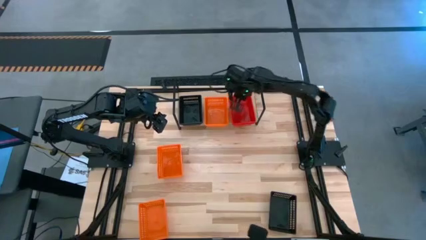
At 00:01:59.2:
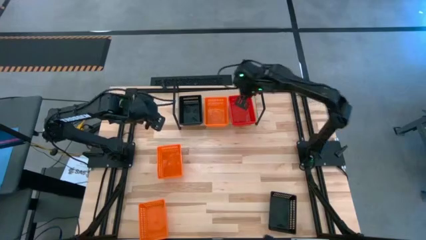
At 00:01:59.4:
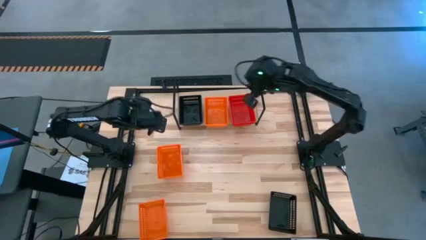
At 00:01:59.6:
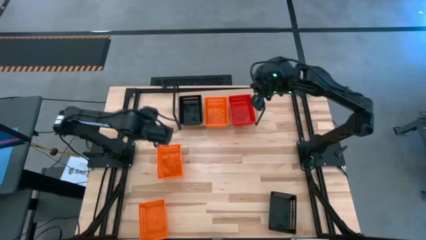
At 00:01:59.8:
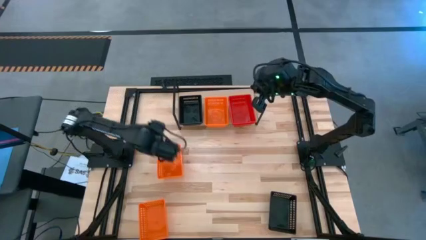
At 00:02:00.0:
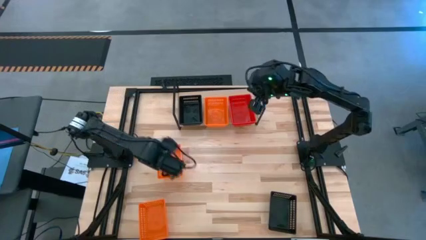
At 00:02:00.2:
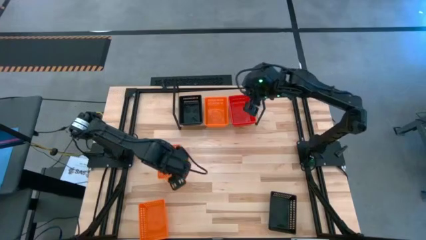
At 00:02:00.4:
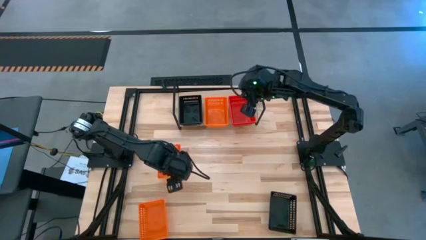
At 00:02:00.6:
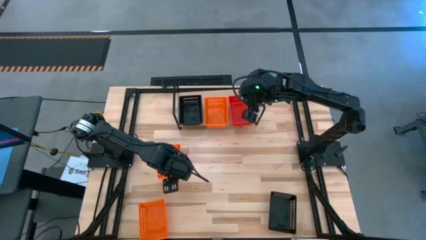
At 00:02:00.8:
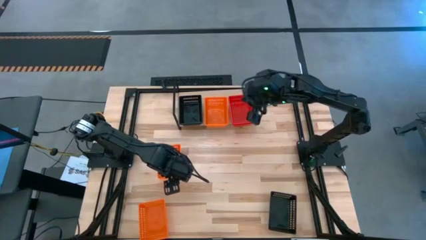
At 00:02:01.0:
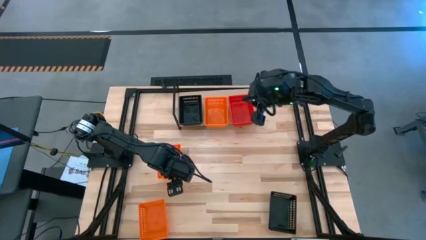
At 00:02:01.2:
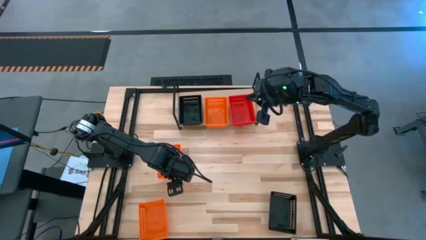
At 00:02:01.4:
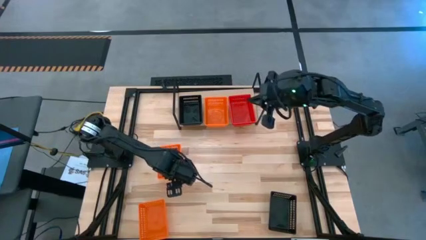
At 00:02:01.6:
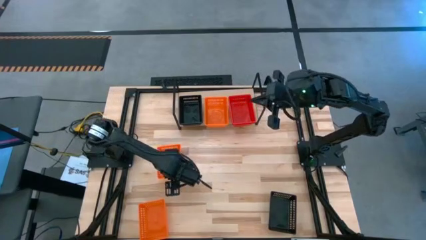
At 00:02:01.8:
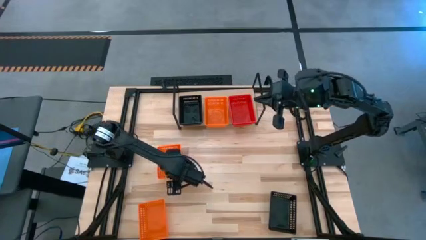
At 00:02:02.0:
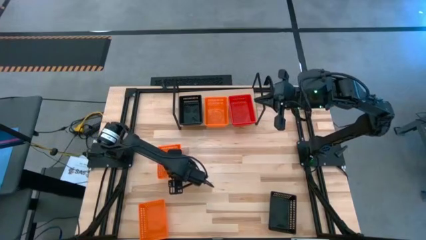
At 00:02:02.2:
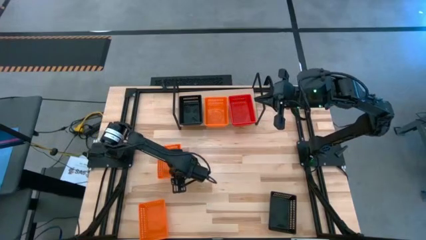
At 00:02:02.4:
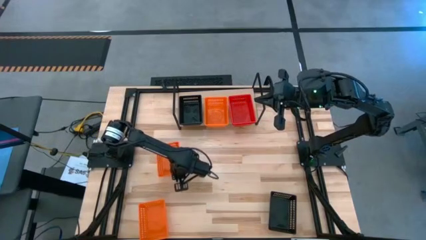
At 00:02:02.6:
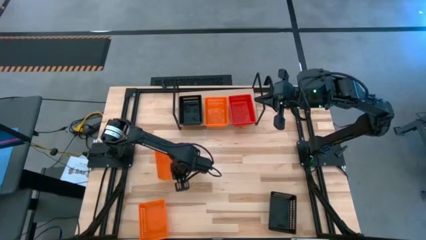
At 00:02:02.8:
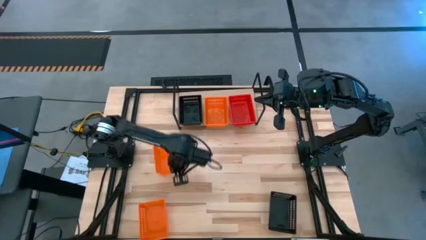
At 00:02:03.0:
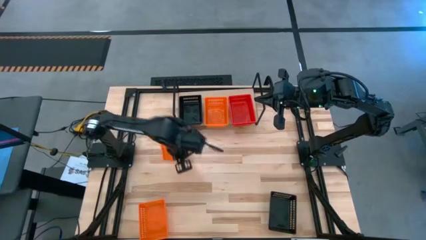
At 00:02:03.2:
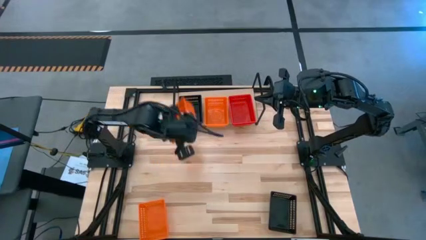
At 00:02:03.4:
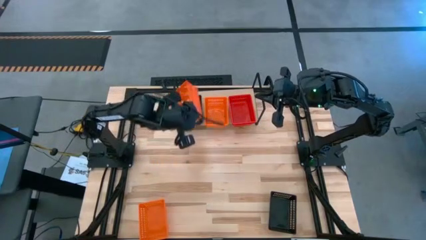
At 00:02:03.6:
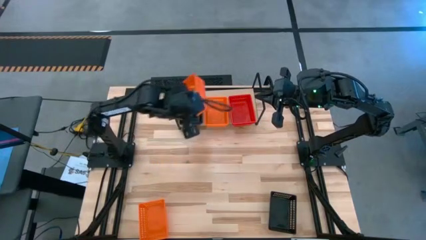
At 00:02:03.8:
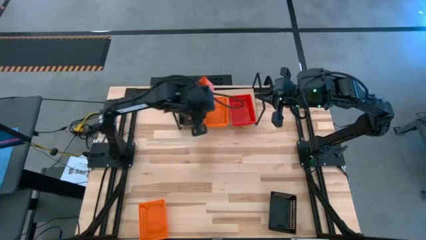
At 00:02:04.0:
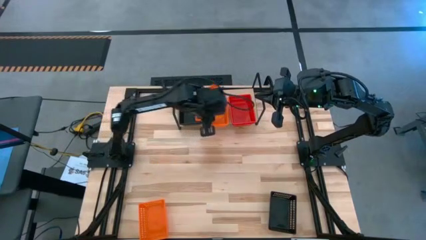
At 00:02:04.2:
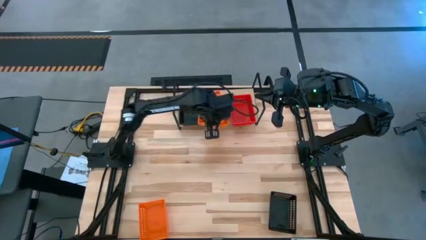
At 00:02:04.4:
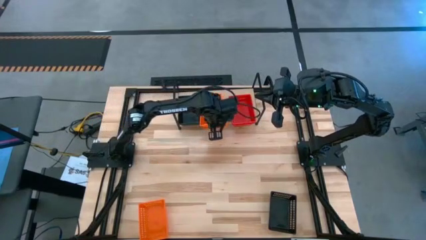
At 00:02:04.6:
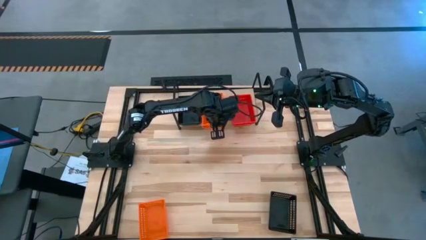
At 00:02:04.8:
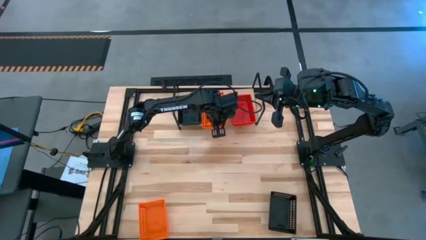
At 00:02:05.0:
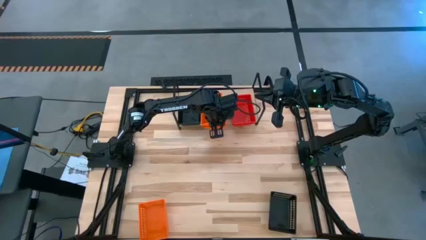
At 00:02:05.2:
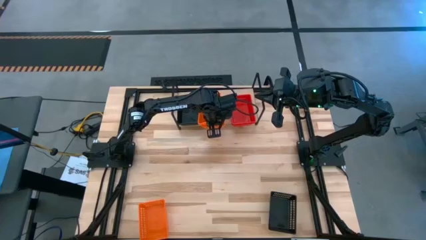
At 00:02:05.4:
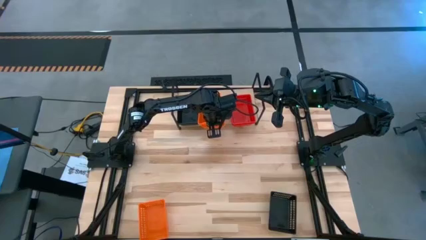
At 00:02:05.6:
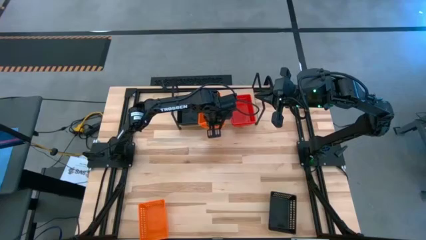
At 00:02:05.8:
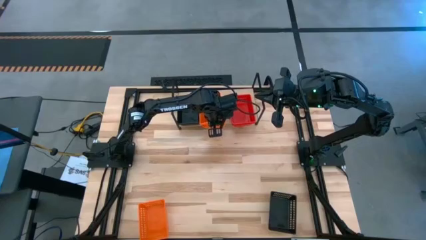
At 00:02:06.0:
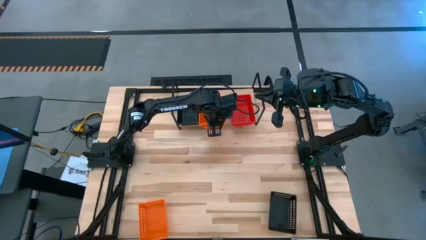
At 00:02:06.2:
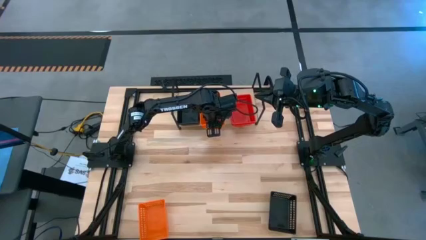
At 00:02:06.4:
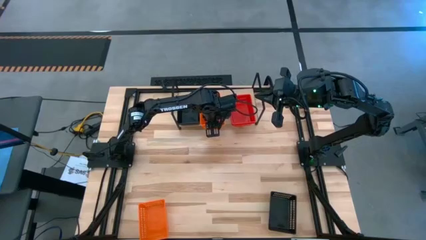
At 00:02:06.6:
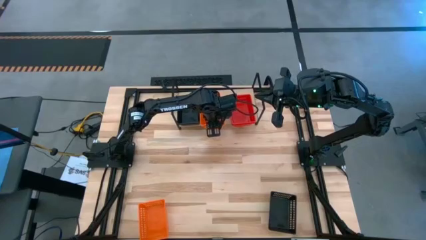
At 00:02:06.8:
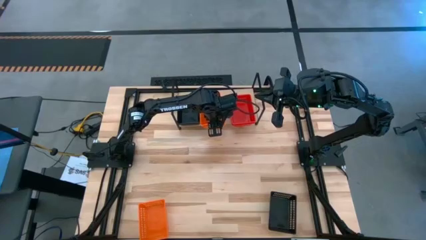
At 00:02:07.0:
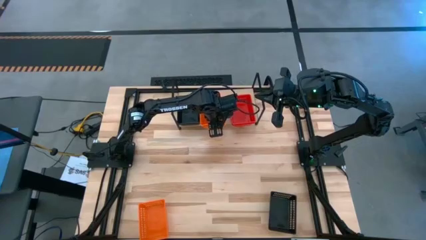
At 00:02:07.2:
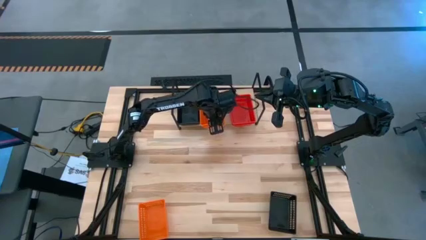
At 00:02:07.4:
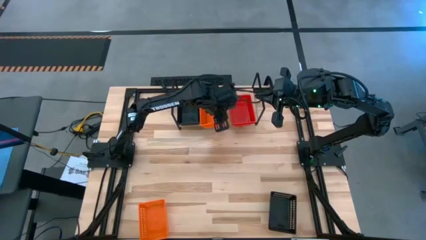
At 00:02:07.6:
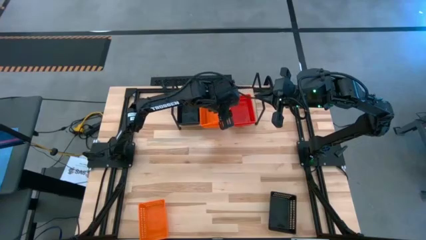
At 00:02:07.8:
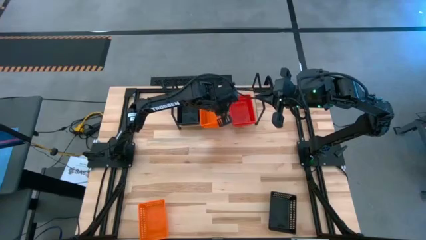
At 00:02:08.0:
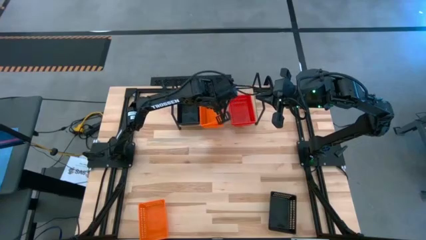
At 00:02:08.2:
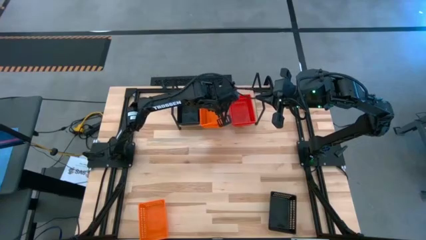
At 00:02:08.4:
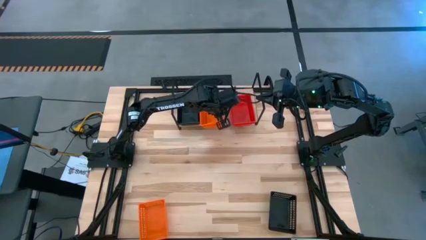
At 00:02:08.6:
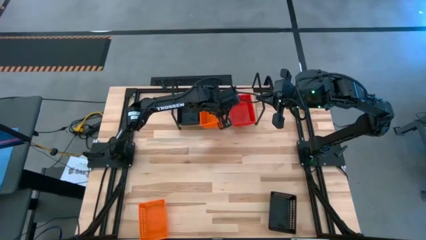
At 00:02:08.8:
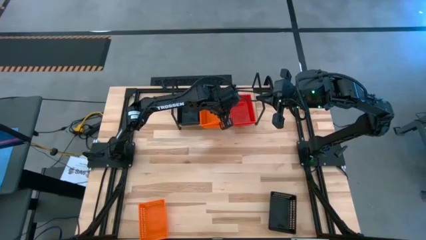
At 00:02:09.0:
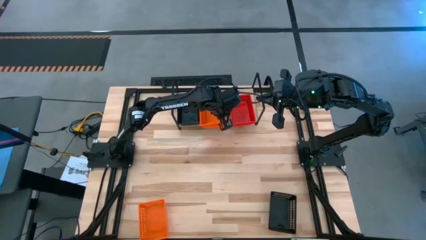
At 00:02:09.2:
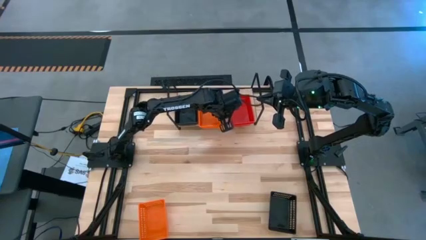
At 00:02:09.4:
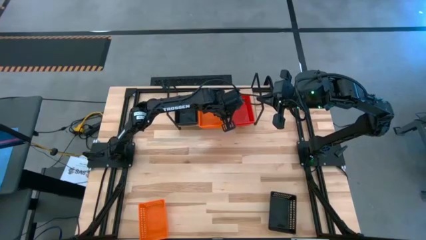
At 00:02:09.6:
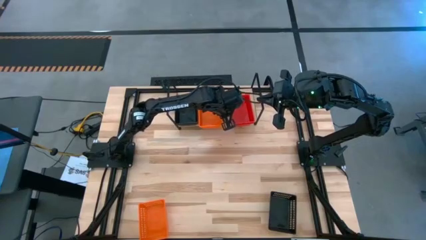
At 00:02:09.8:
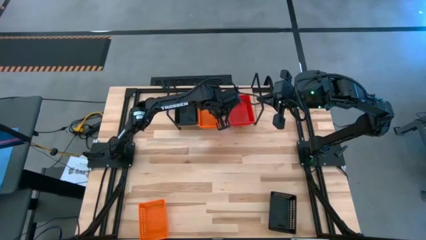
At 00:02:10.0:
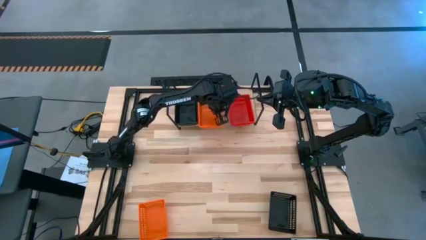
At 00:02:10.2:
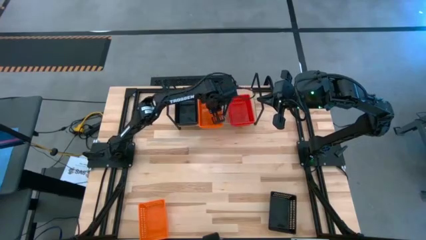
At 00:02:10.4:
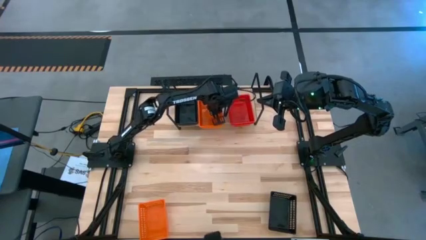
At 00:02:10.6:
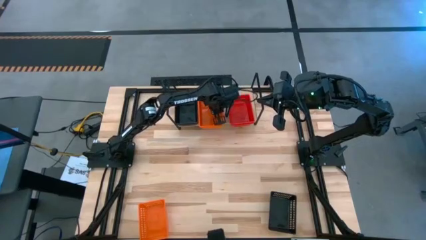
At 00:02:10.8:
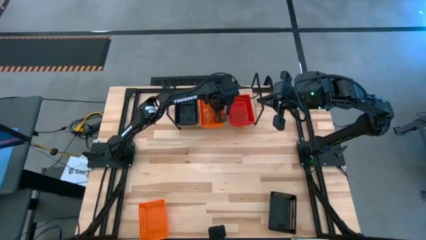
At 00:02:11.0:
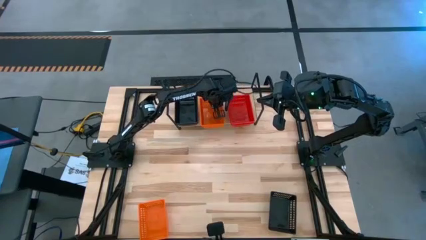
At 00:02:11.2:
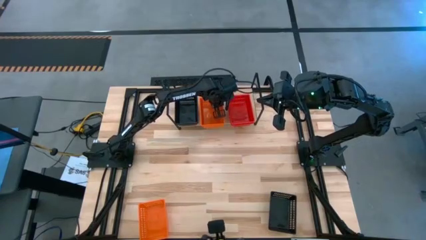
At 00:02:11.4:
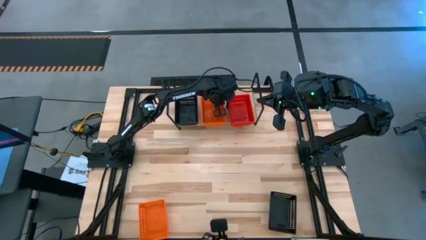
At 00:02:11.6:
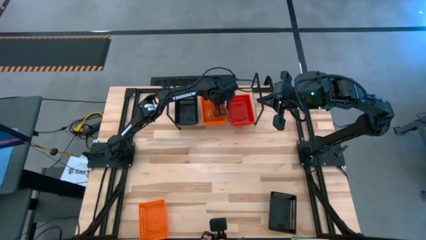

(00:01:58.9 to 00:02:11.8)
Task: Stack baskets on shelf by color
Stack the orange bin on top of the other orange bin on the shelf

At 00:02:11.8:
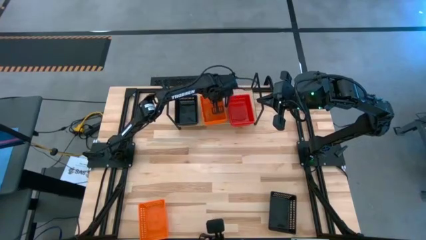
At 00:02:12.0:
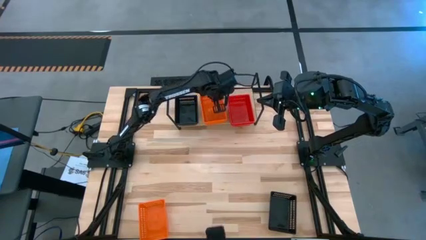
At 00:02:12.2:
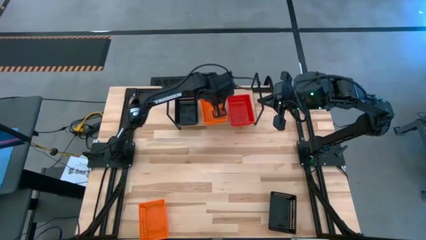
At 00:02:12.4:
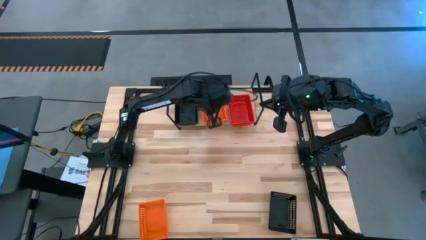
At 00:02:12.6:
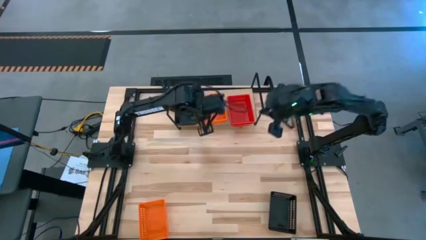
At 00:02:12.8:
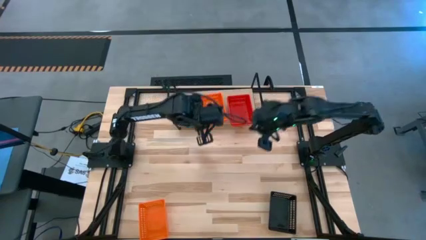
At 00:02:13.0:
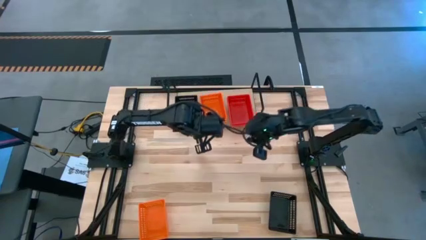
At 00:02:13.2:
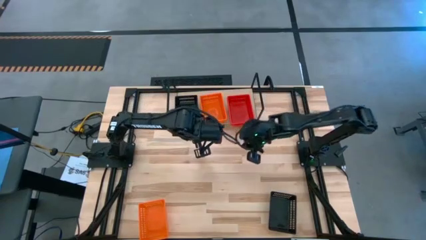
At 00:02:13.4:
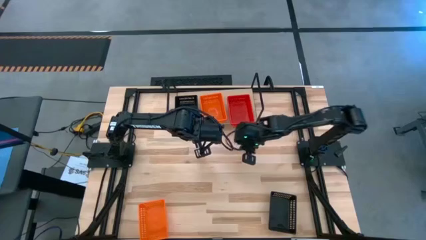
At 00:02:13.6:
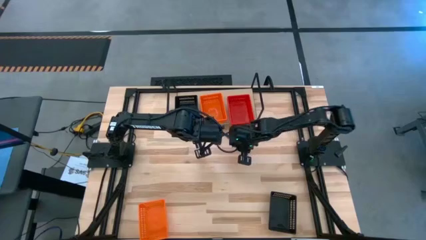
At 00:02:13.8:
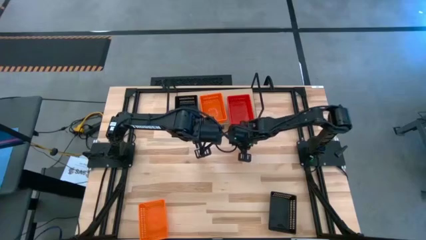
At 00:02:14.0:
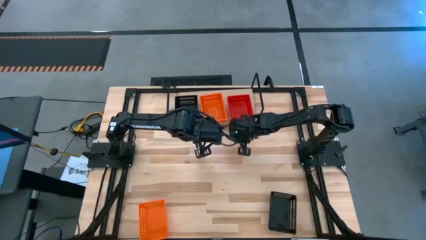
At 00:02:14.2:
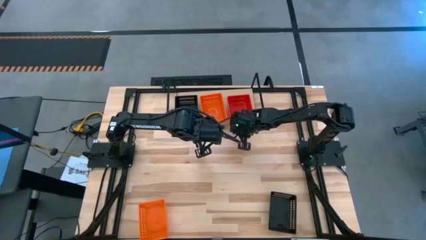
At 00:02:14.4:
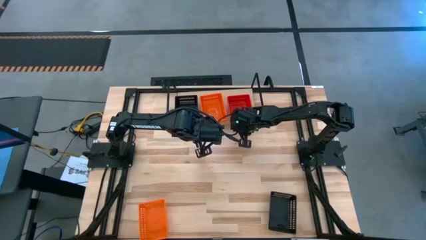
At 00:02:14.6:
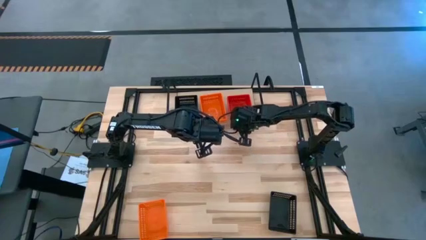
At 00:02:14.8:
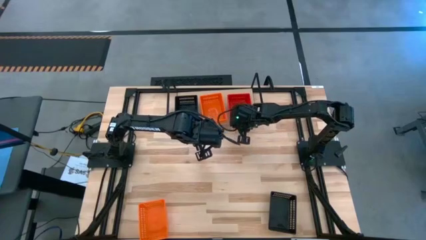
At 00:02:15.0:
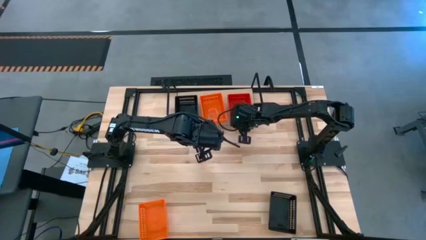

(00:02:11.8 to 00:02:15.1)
Adjust the red basket on the shelf
